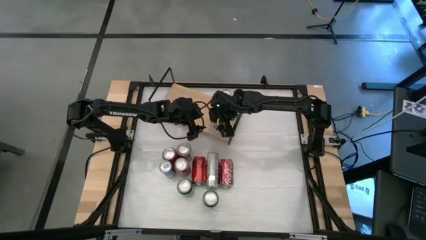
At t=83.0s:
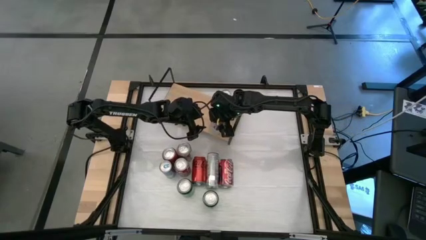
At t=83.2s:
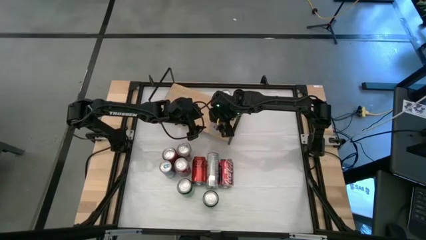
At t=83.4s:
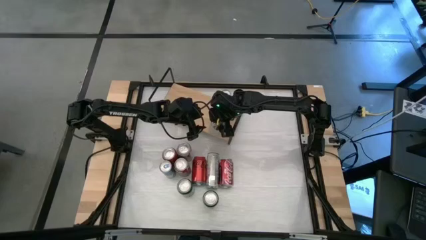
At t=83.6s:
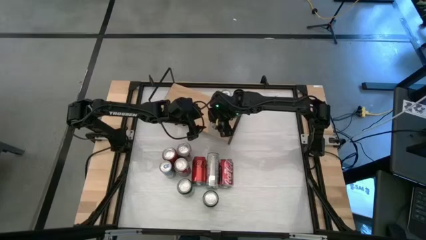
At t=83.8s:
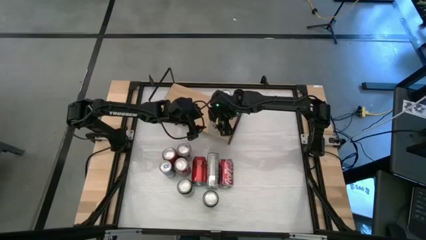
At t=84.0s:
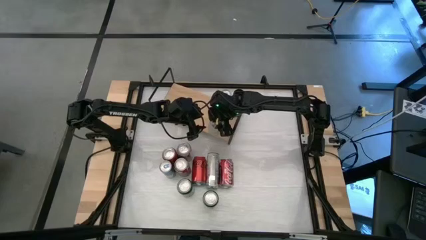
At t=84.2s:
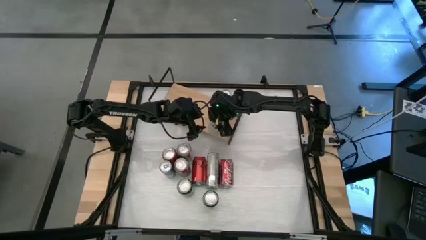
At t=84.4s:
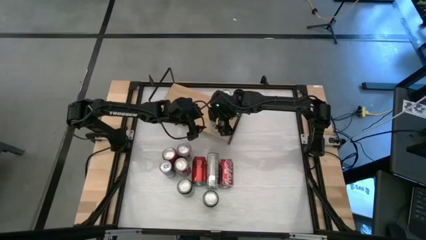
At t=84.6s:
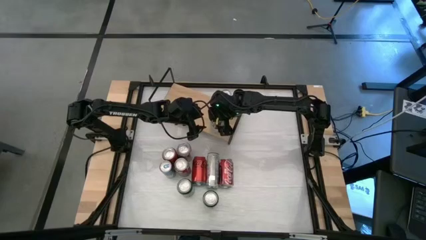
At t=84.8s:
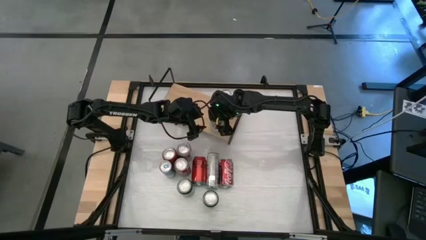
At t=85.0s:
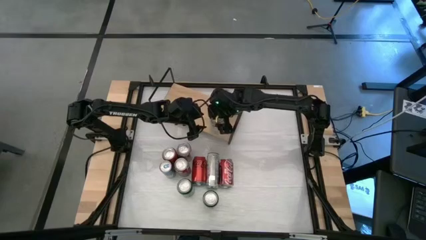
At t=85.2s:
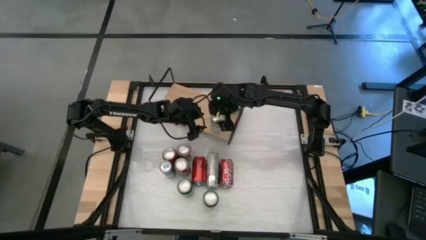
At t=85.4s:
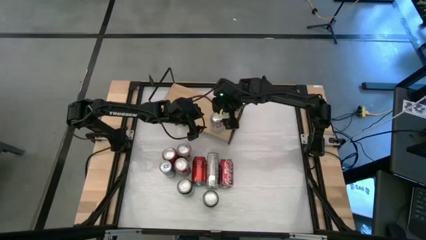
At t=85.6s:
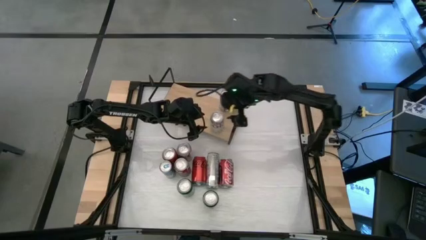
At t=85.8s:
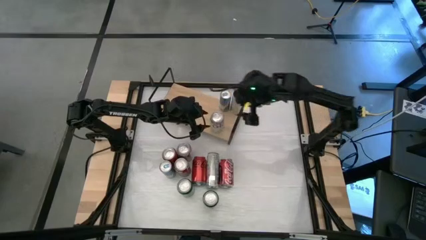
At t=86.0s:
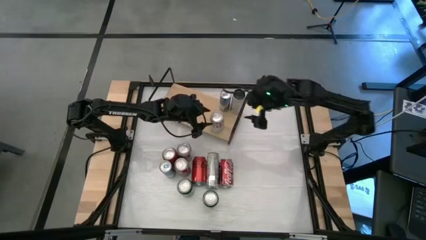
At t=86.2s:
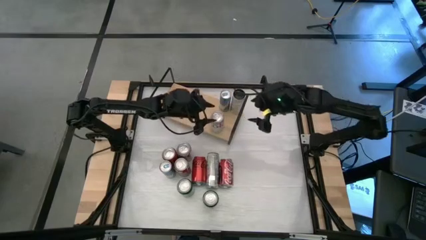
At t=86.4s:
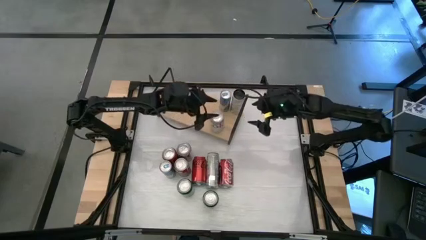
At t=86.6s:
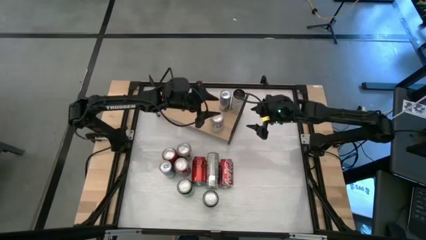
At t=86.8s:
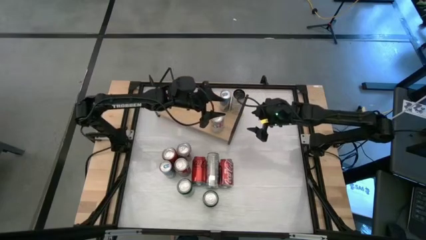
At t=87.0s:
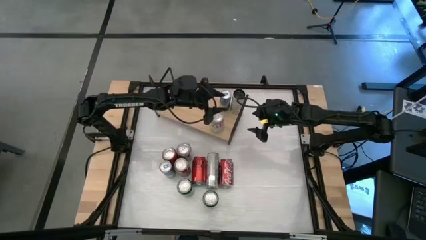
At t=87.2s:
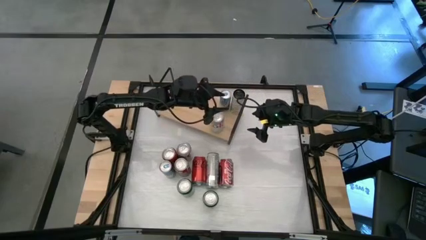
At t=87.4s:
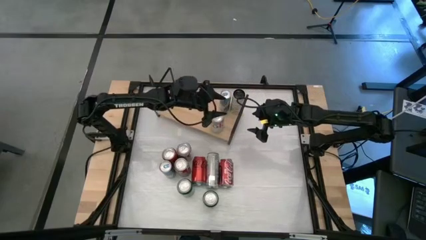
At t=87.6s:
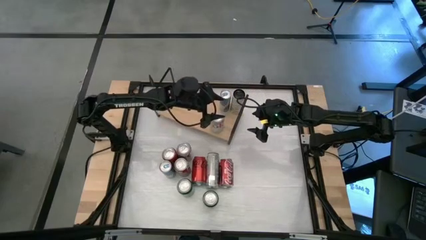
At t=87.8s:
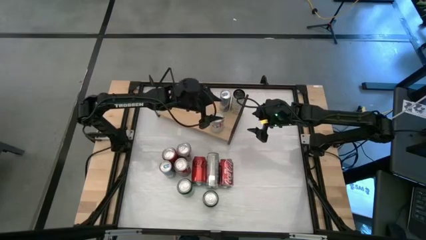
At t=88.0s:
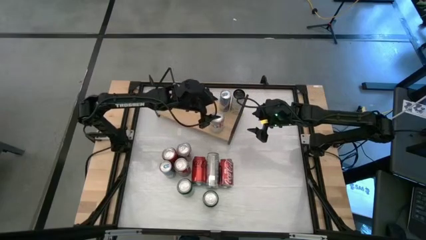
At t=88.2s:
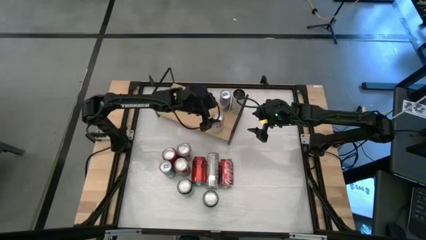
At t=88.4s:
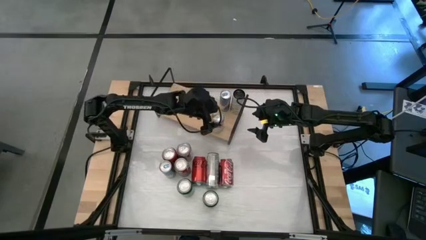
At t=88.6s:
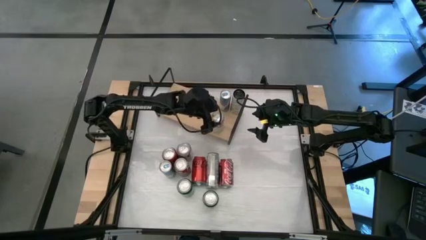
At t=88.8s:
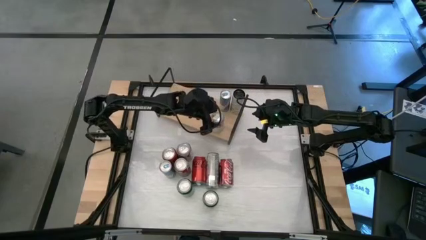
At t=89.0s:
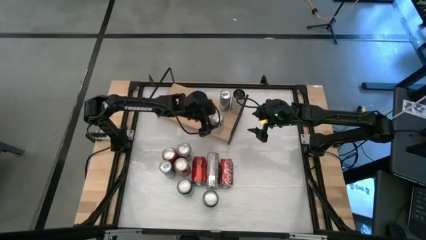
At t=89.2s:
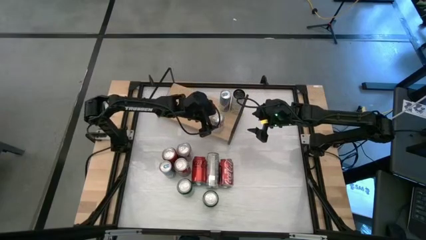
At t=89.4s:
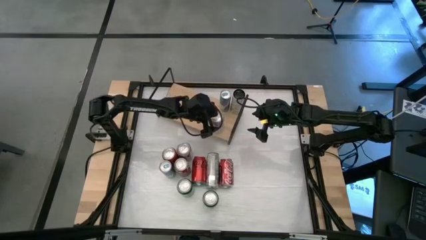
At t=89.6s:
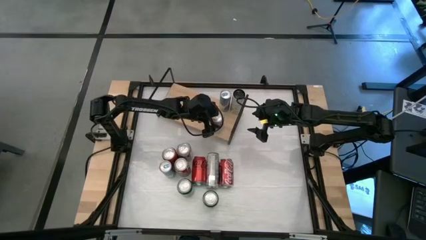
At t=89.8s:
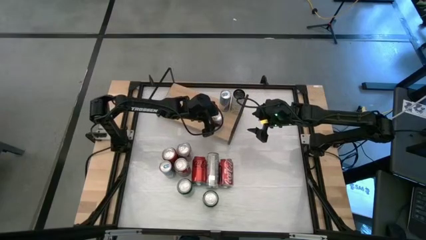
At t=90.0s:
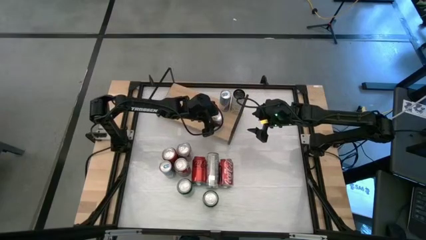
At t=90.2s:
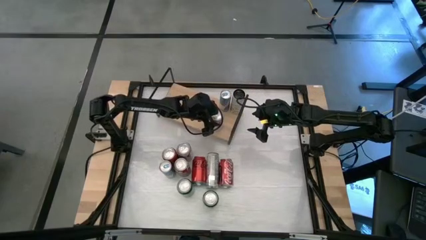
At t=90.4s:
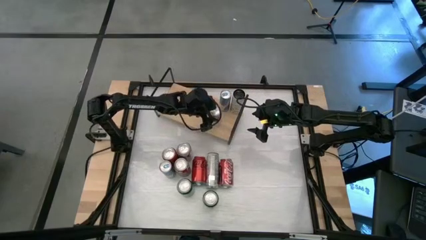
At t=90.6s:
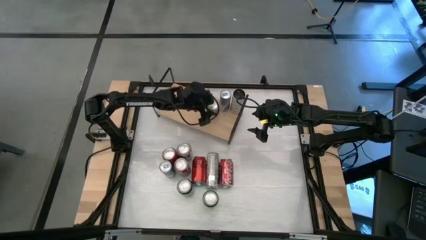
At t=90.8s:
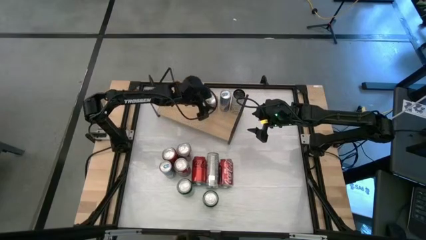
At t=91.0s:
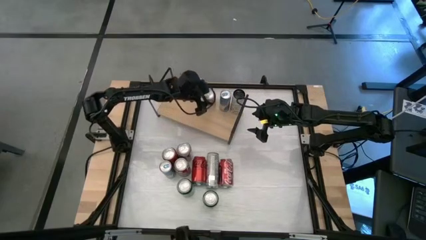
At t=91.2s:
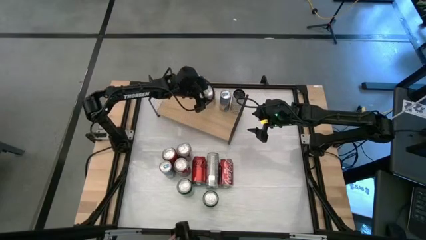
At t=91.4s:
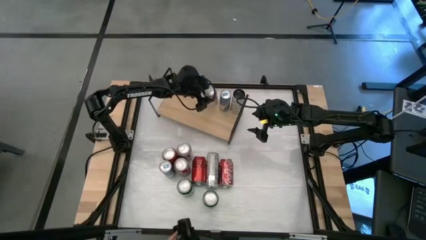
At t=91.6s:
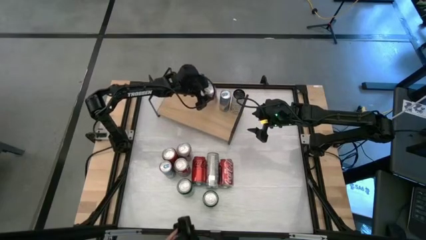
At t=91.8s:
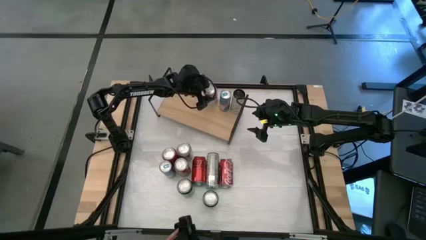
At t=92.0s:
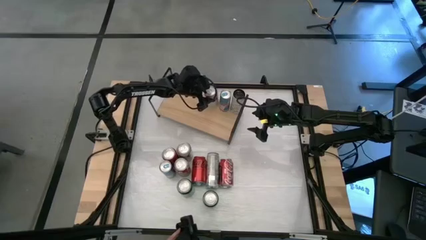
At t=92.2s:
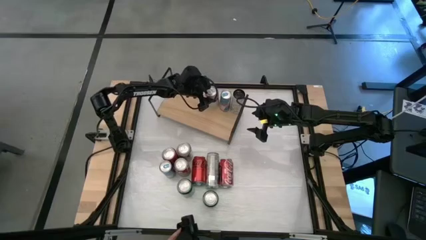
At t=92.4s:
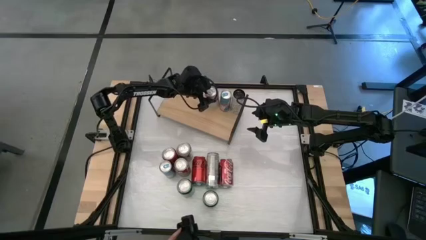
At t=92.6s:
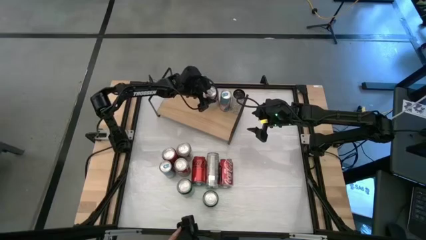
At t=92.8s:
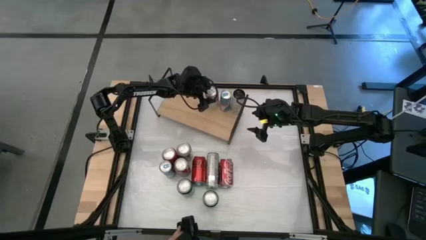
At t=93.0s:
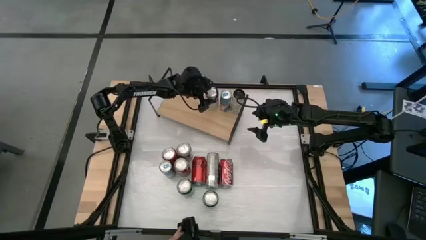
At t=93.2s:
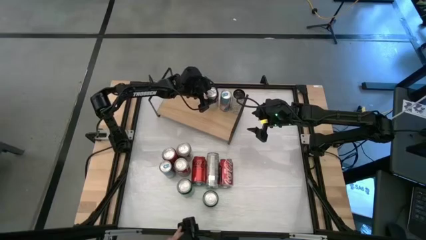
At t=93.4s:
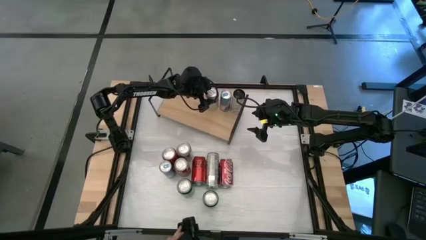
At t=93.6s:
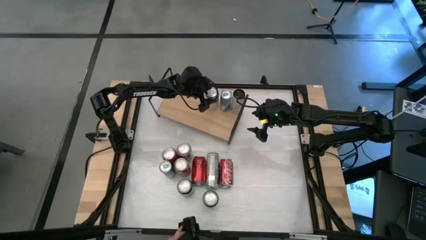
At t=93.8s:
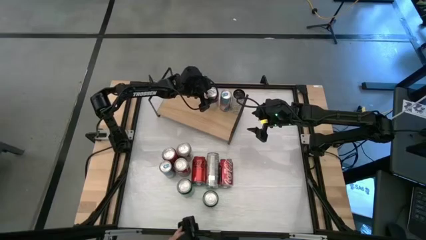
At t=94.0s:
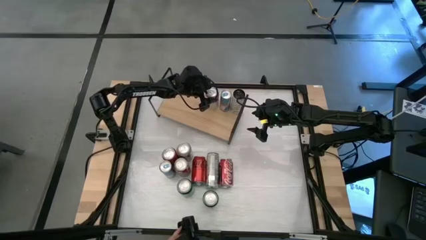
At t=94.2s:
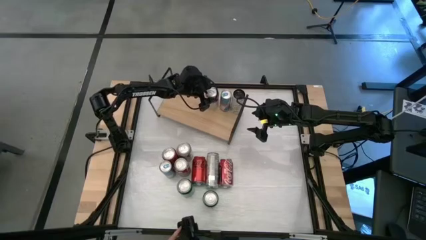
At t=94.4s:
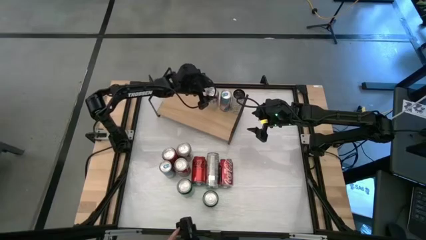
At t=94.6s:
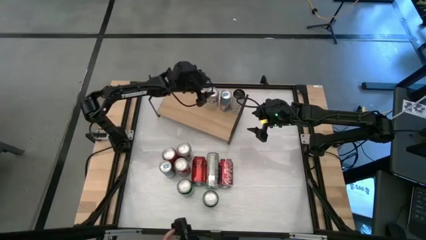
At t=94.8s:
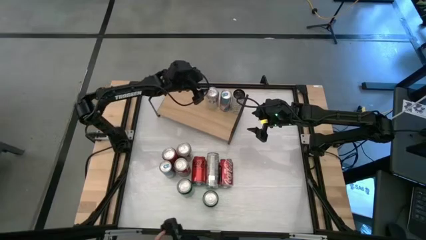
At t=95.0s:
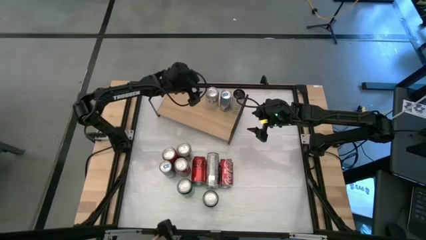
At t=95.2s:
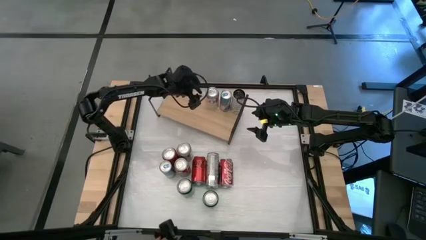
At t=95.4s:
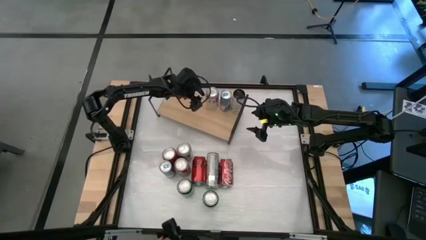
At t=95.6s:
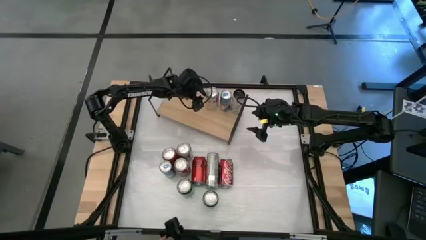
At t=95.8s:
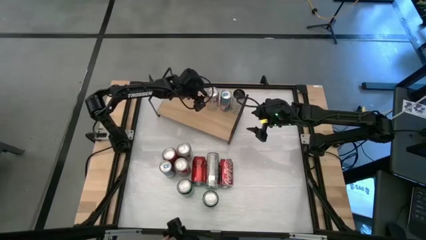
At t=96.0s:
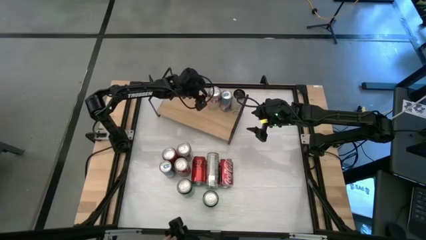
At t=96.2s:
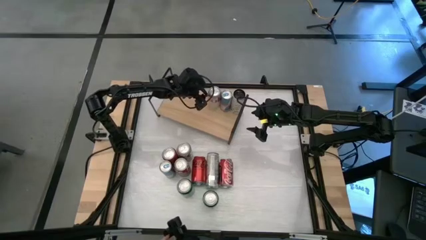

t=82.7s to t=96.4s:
Task: Place canned beverage on shelf
Put the right silver soda can on the shelf

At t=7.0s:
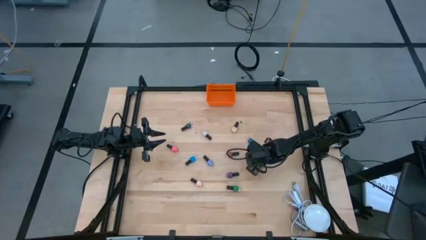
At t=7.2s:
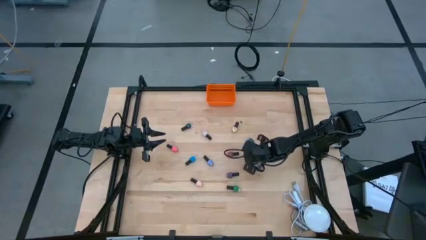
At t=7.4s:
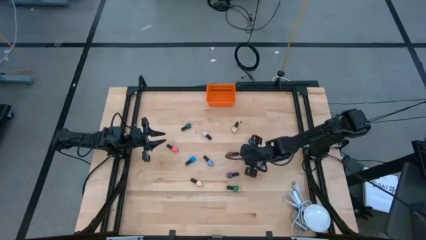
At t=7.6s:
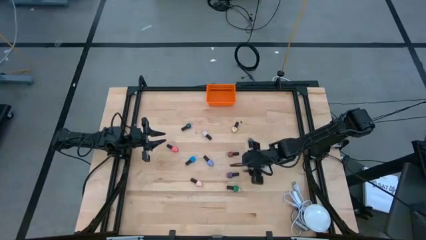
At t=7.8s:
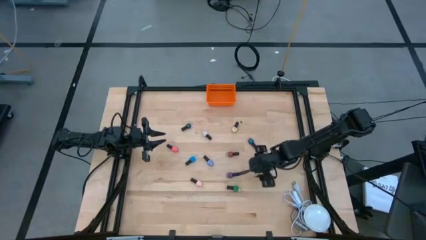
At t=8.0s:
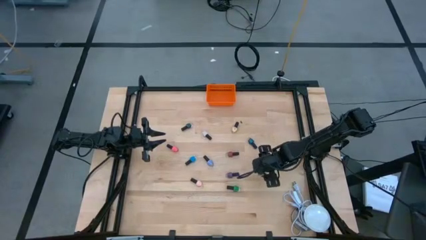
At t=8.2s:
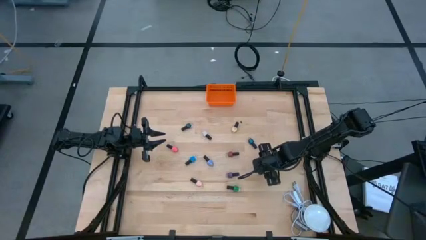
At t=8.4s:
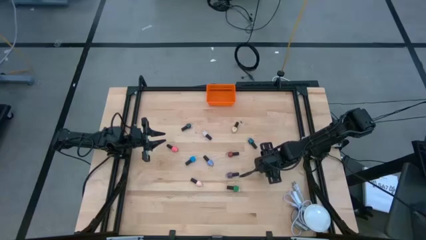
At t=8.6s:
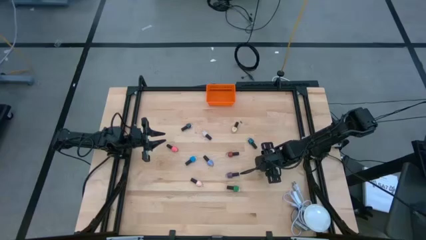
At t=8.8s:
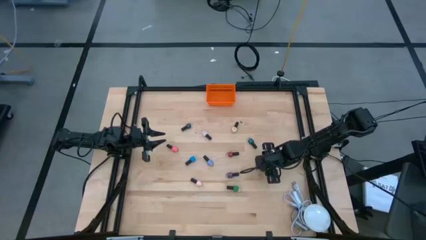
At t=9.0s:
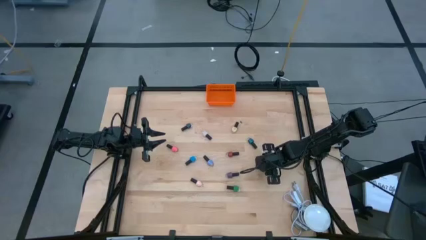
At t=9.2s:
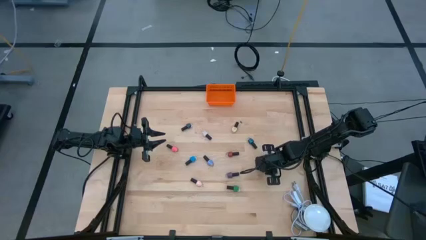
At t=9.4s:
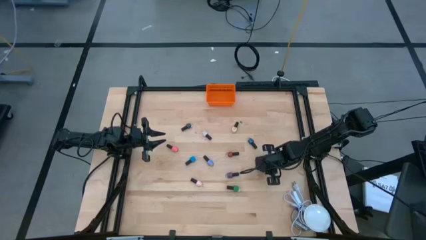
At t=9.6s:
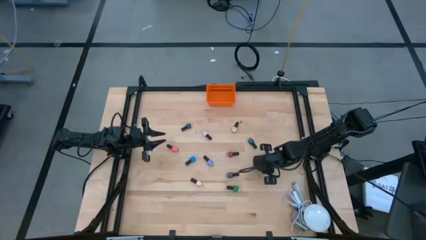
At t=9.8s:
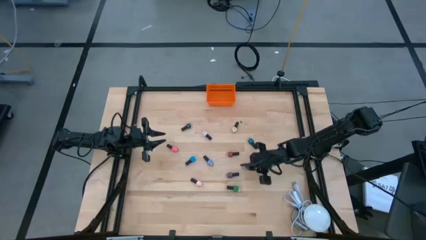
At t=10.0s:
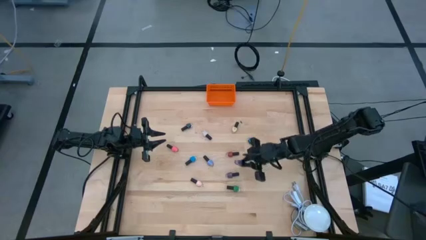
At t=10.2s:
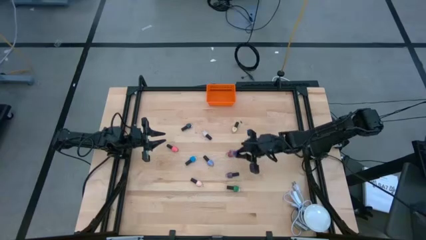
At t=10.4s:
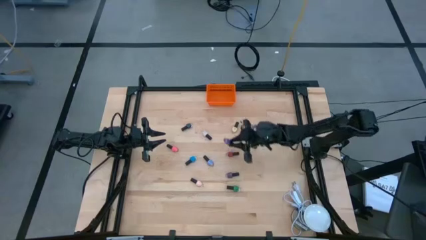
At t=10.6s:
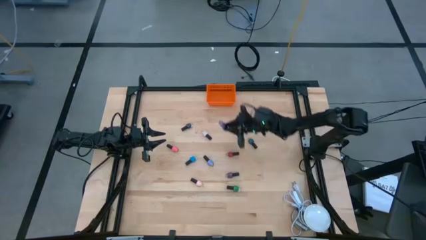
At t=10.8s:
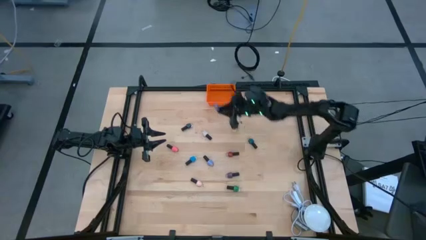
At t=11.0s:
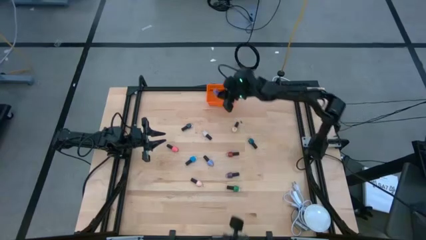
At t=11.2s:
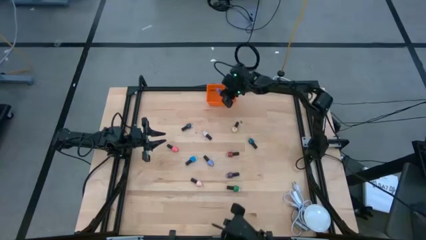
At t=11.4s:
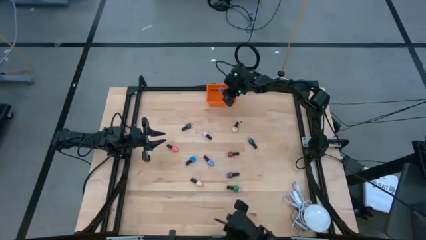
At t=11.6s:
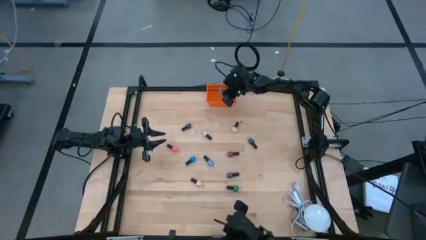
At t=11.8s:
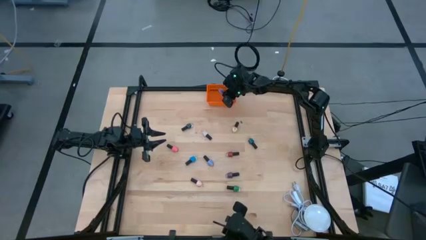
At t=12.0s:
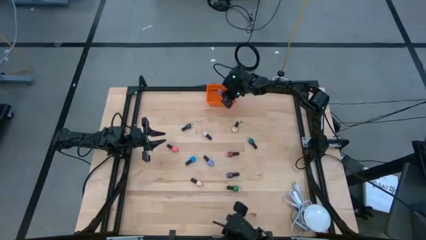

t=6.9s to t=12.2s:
Task: Pick & Place Nail Polish
Put the violet nail polish bottle into the basket
